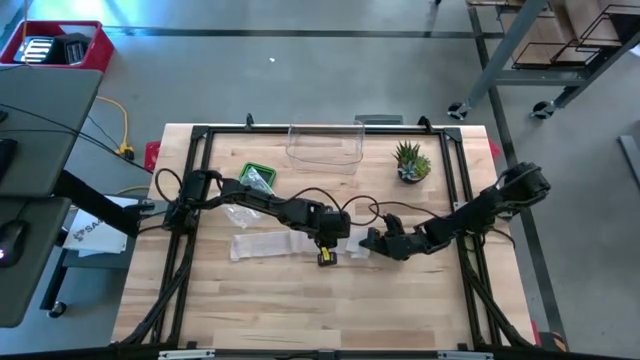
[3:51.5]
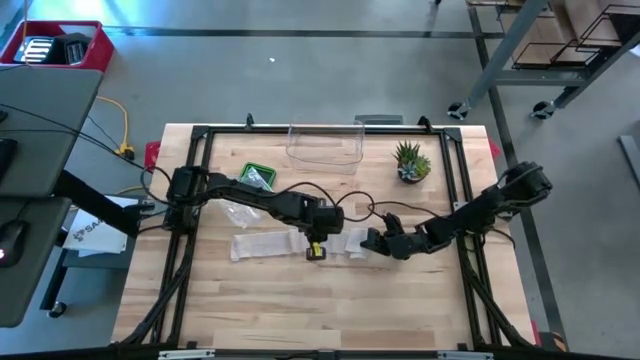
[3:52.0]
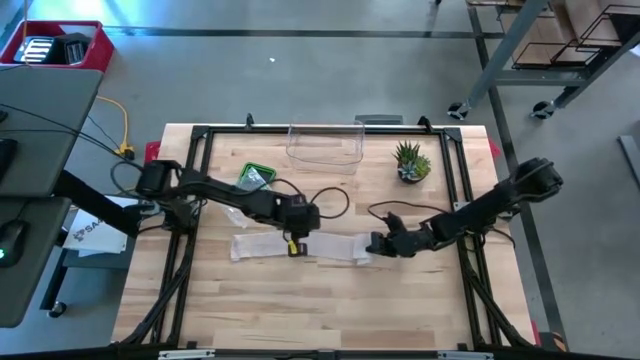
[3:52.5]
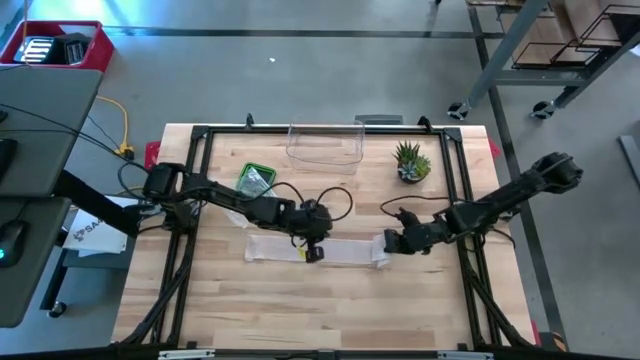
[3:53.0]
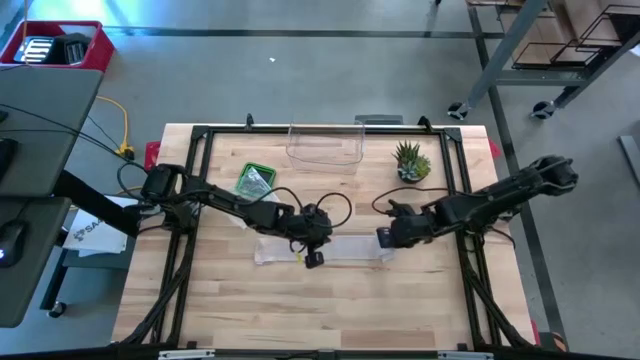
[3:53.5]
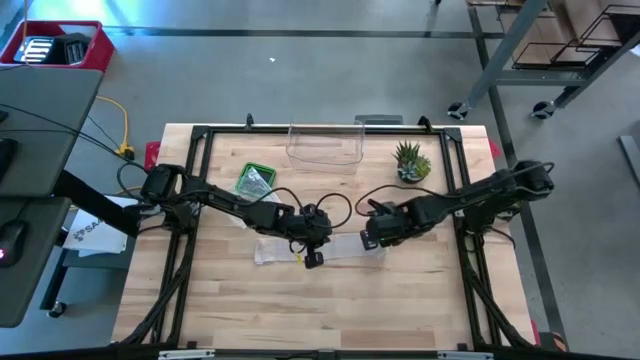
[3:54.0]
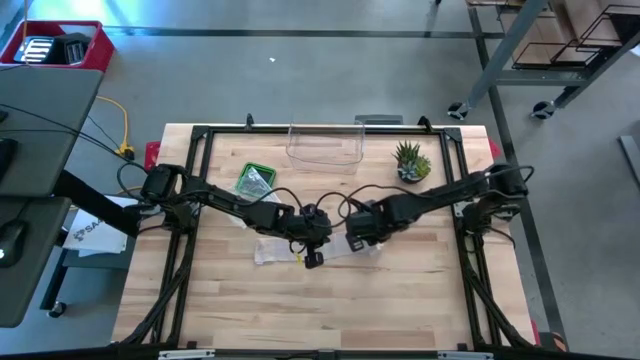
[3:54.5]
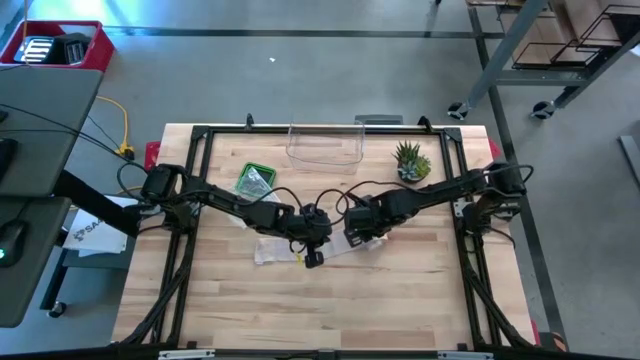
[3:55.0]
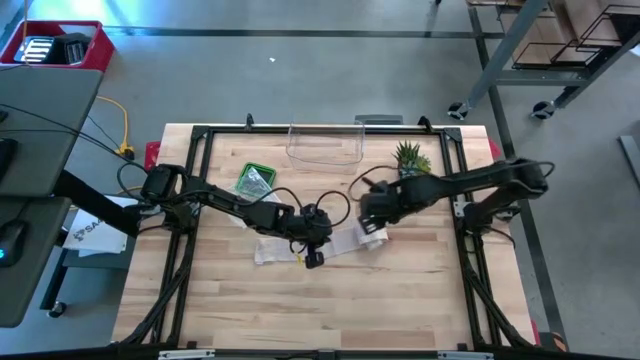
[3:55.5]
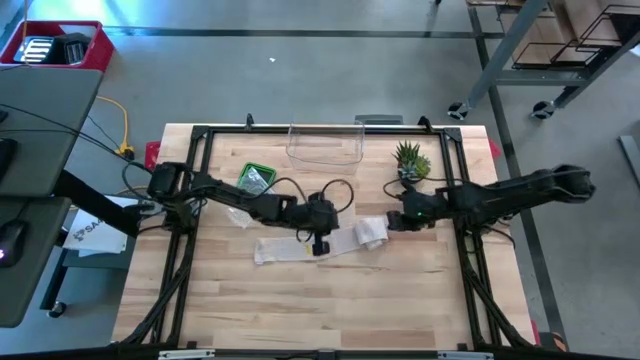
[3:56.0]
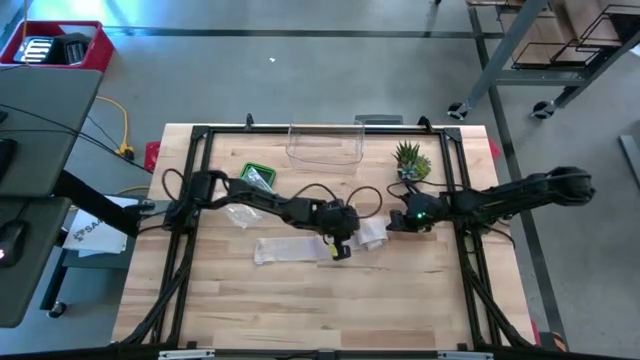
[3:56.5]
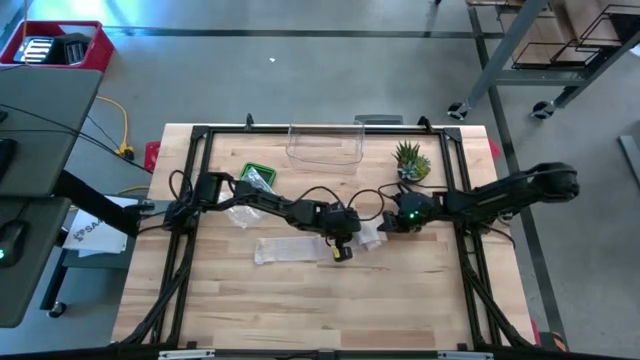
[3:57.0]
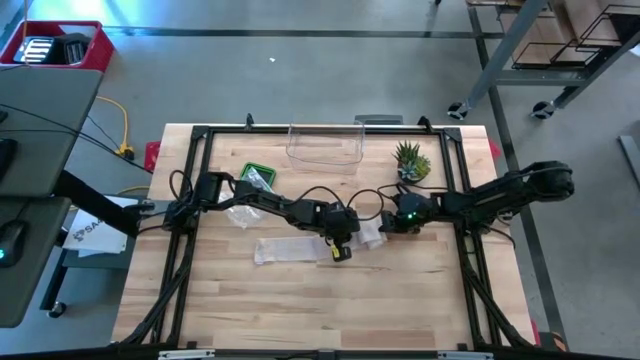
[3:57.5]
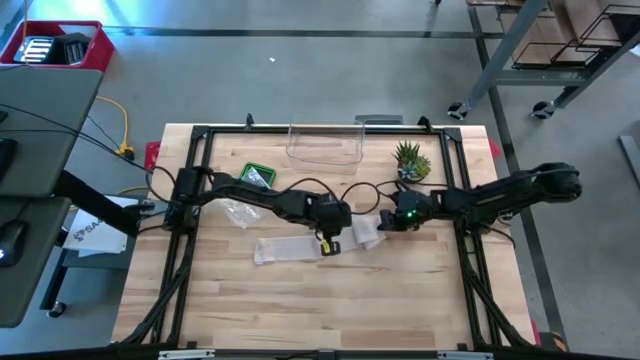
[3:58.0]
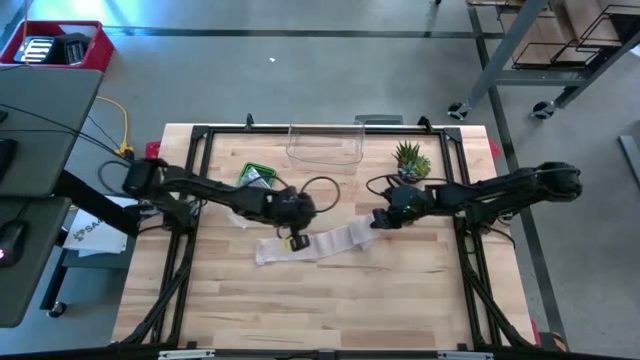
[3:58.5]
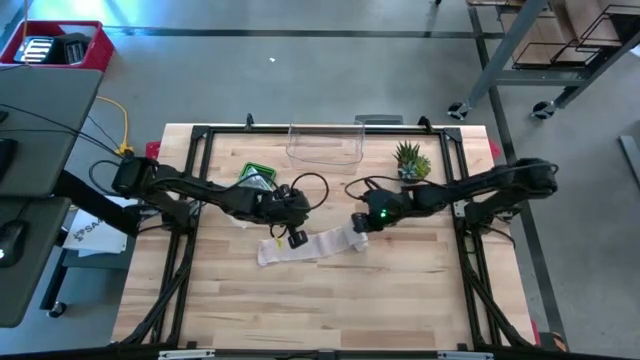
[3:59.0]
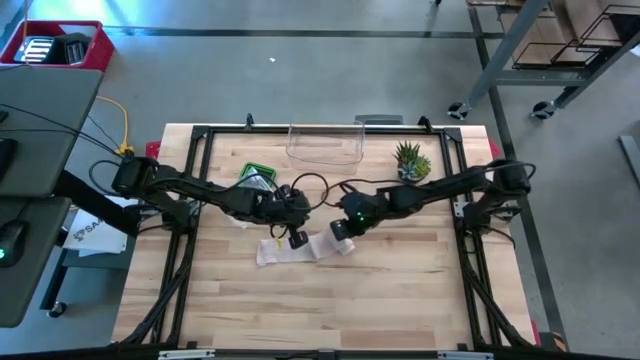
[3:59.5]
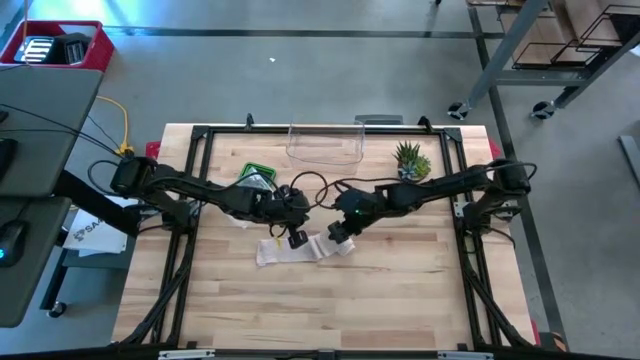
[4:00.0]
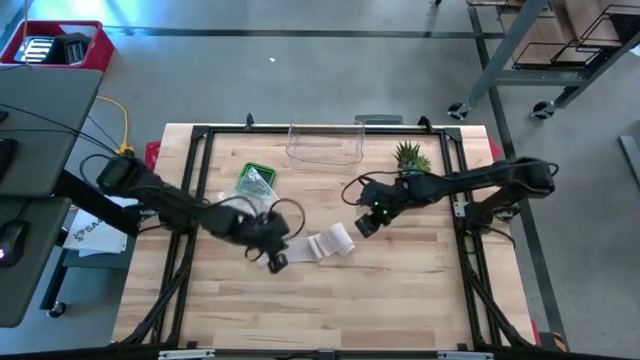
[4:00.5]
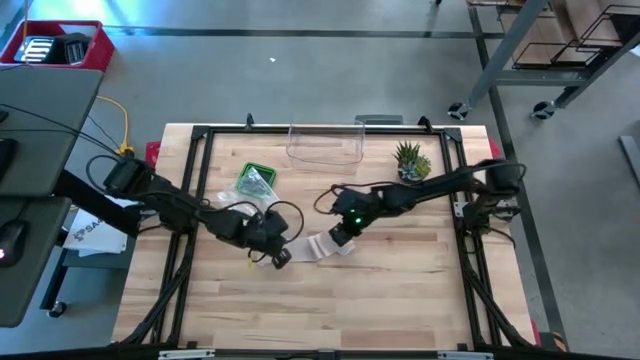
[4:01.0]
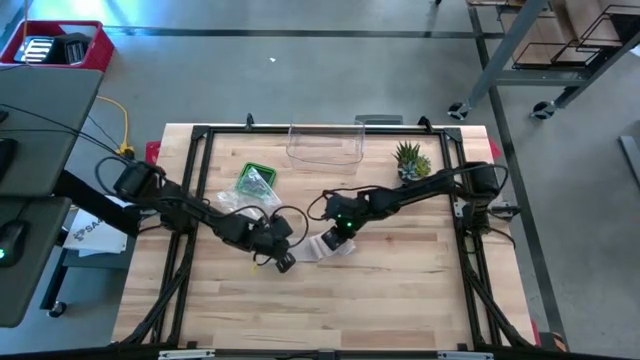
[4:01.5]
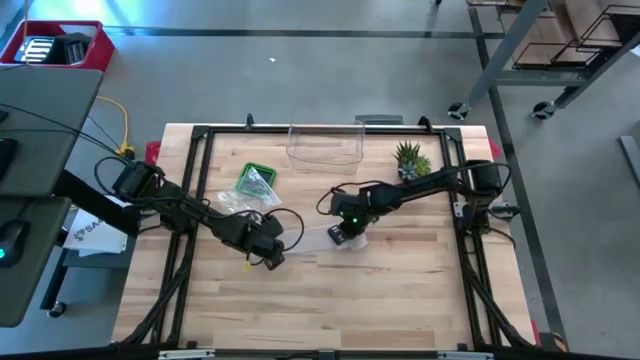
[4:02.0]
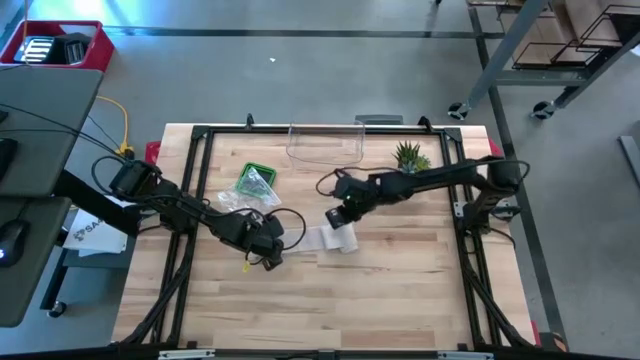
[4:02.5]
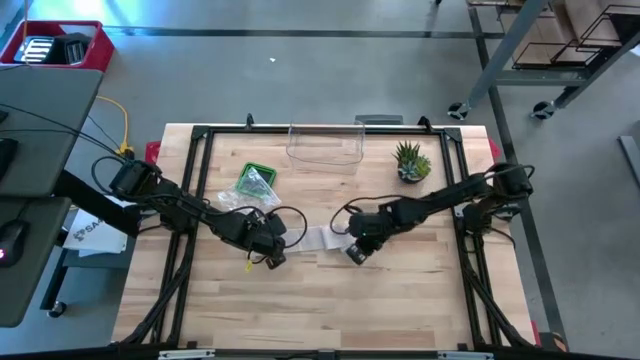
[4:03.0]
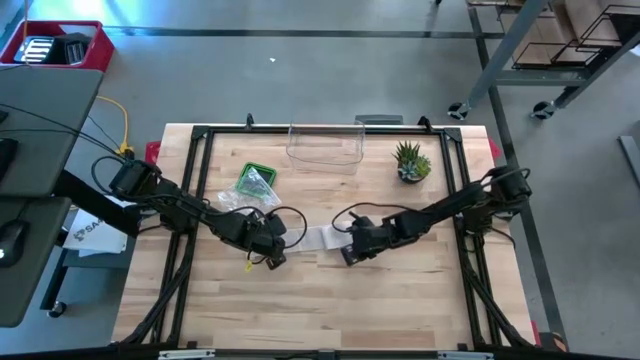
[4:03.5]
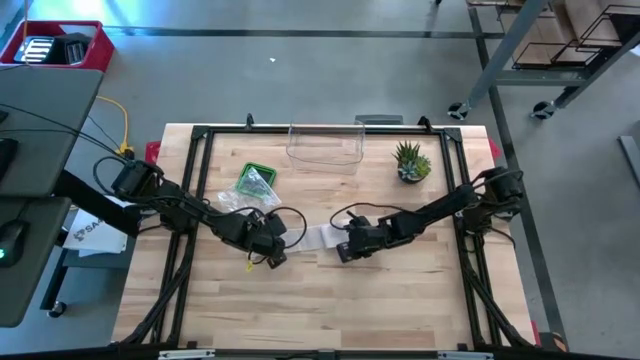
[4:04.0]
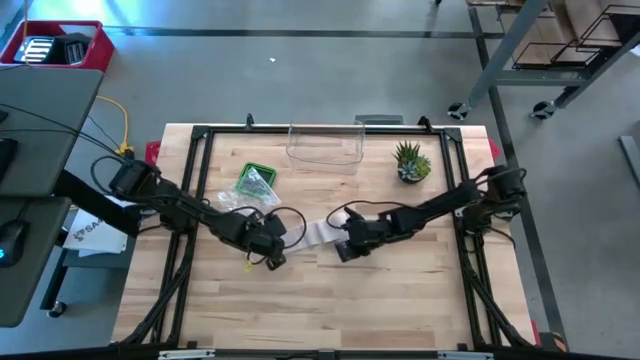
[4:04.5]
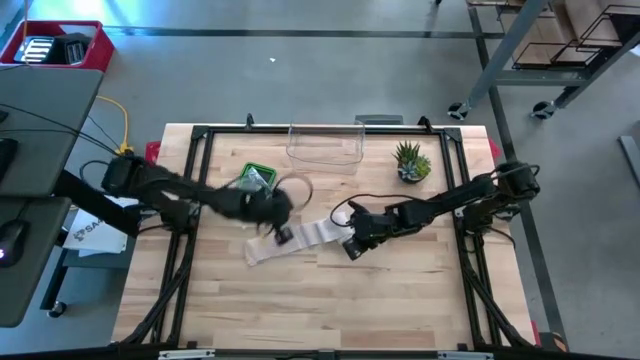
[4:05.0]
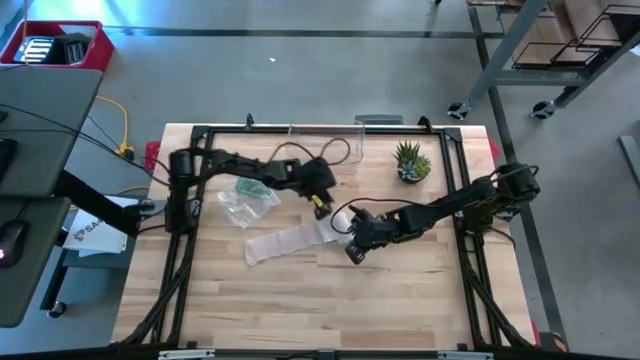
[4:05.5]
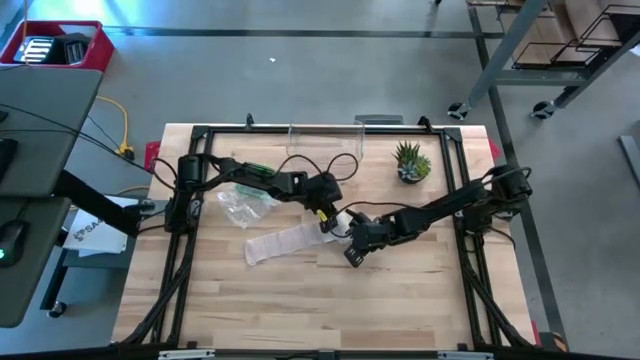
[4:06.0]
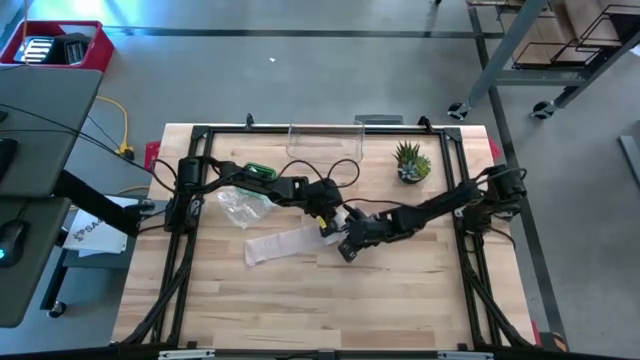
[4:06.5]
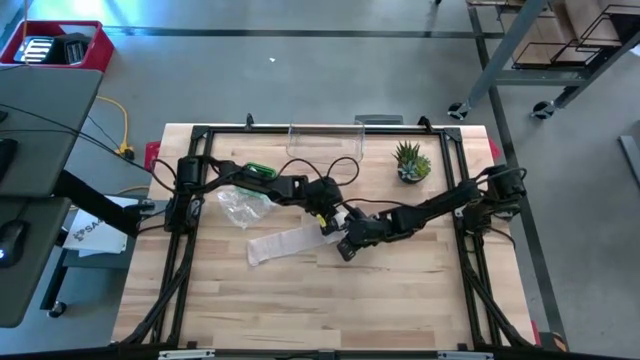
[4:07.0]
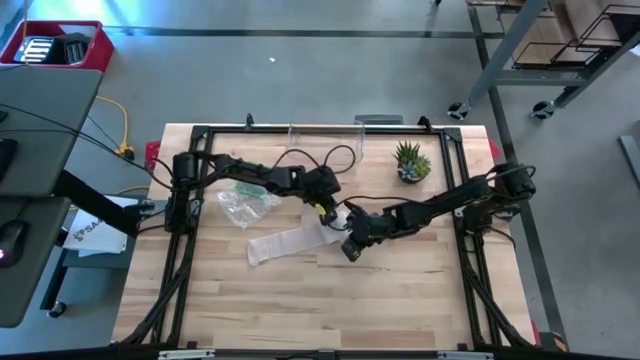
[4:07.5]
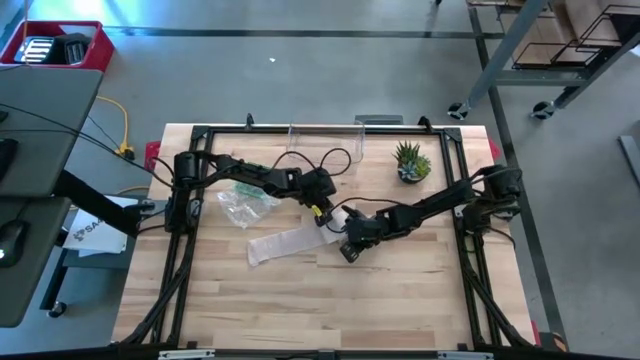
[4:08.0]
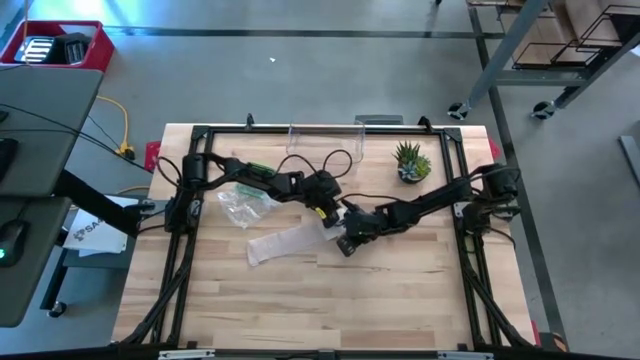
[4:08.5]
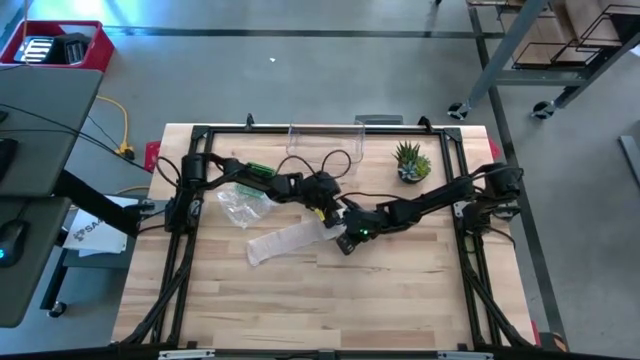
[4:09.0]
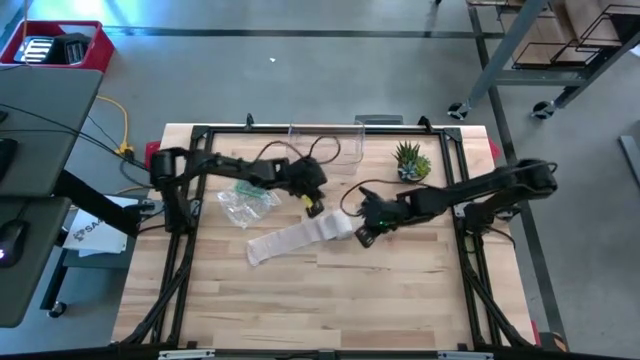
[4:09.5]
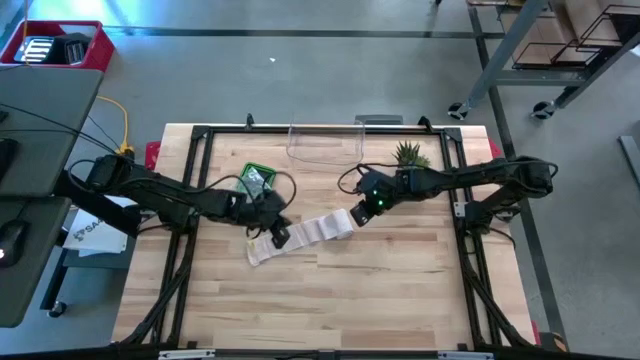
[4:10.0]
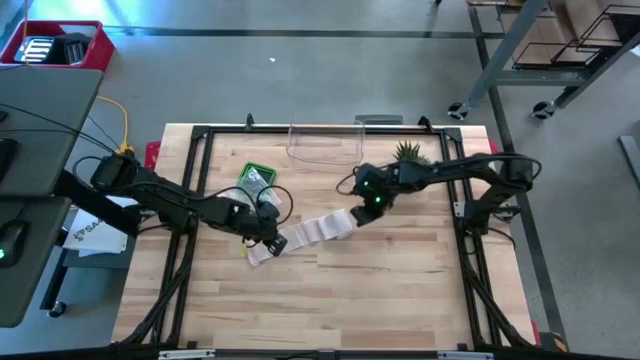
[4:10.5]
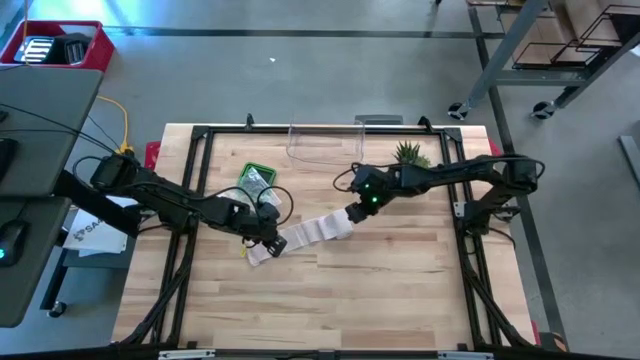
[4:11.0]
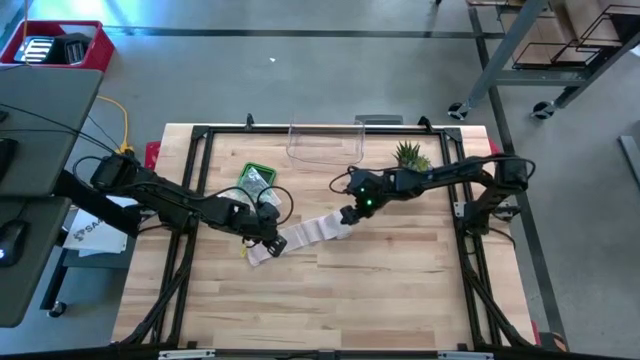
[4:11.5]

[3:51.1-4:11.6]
Task: Roll bandage
Roll the bandage
